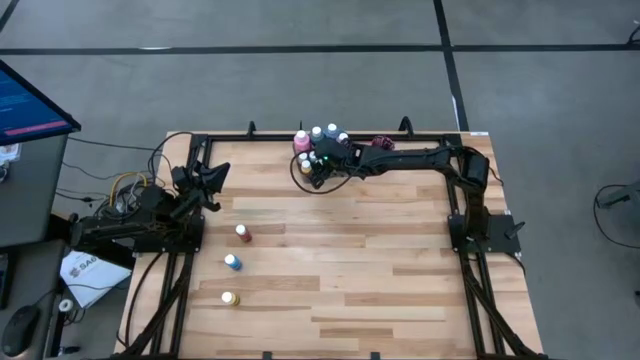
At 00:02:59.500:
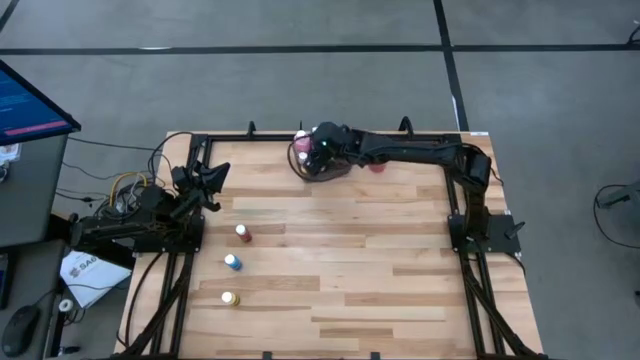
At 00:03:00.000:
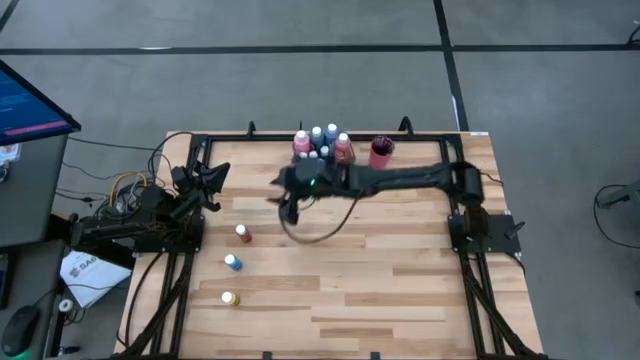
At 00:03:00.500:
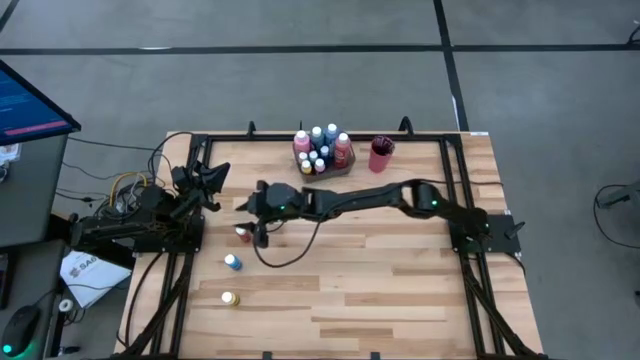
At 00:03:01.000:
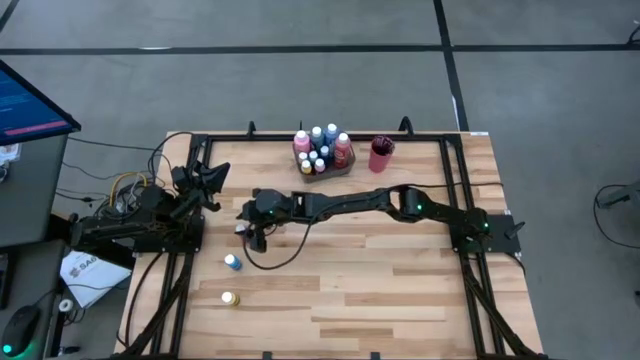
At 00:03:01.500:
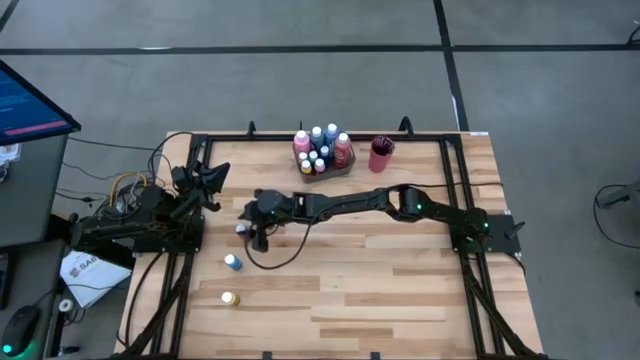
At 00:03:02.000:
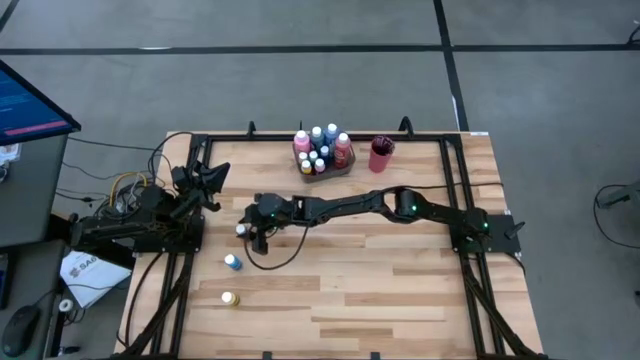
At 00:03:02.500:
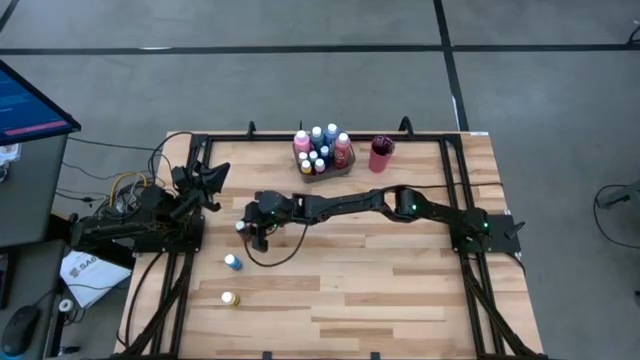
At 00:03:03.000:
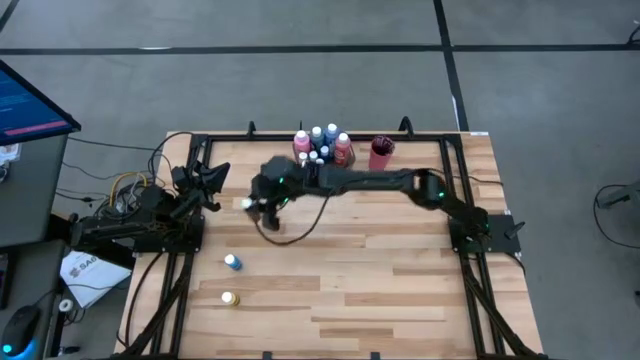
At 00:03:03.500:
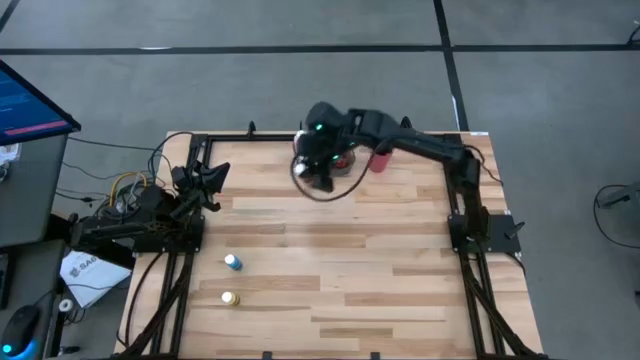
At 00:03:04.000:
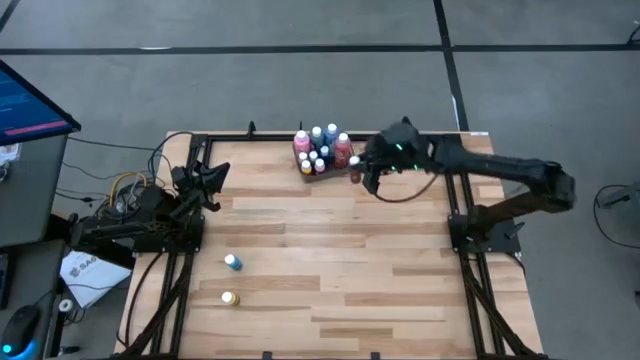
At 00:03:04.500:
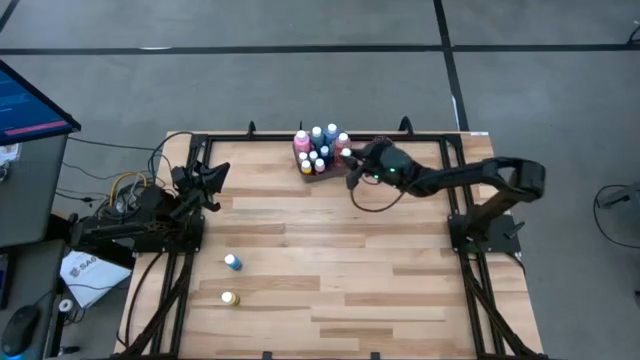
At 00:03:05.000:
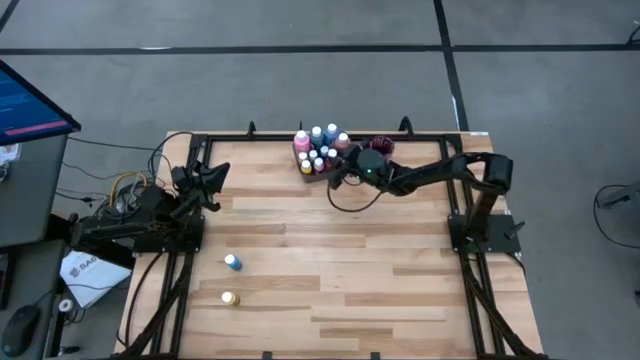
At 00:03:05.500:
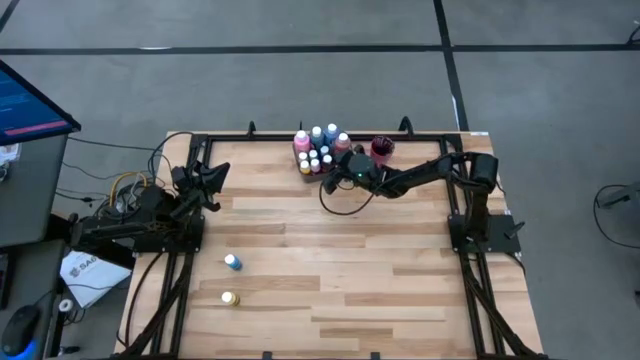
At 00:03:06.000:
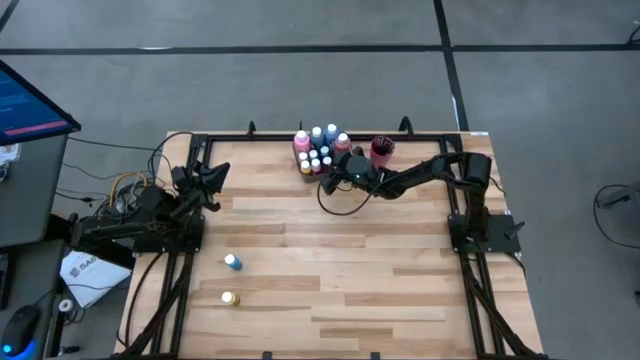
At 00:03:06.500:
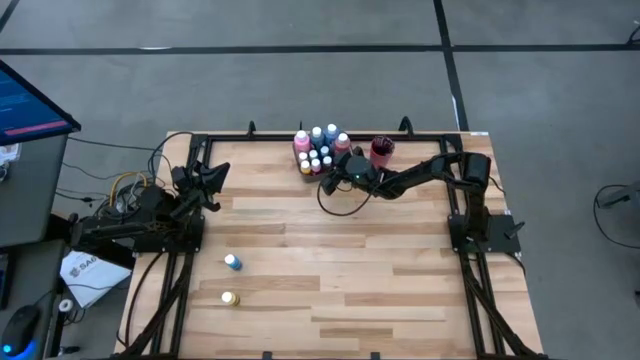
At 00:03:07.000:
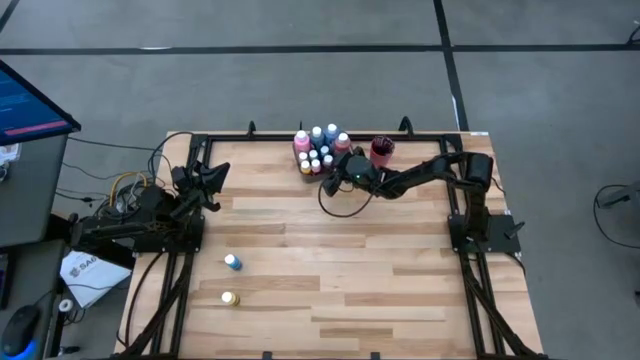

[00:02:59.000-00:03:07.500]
Task: Pick & Place Paint Supplies
Put the red paint bottle into the gray bin

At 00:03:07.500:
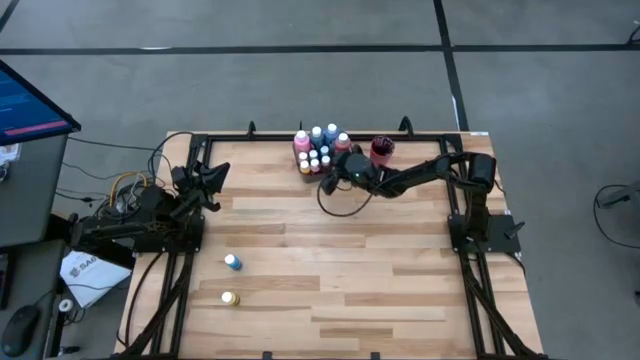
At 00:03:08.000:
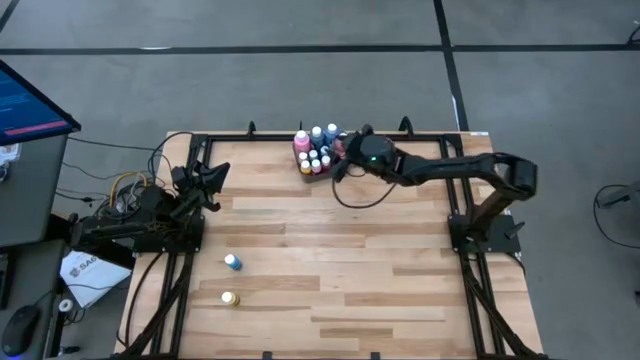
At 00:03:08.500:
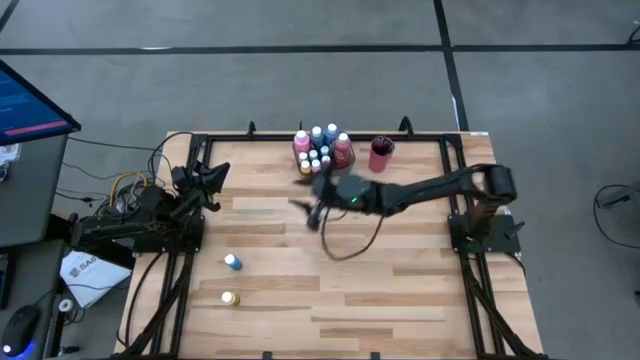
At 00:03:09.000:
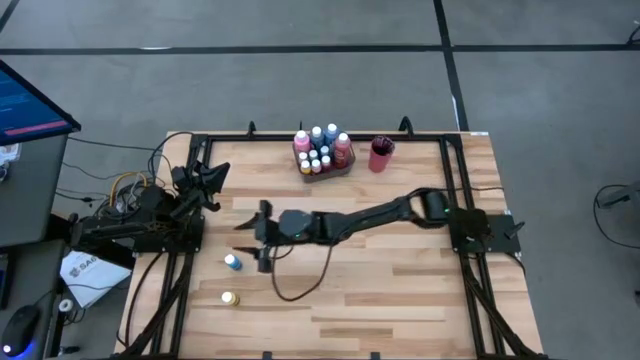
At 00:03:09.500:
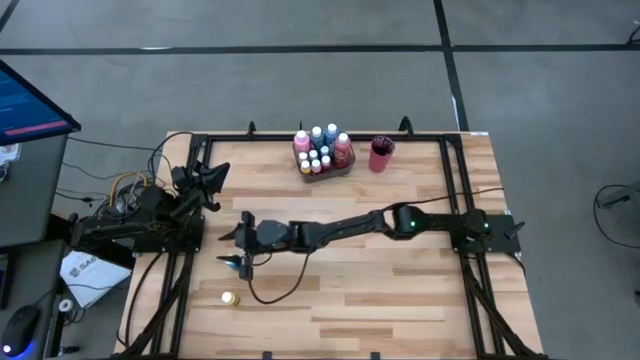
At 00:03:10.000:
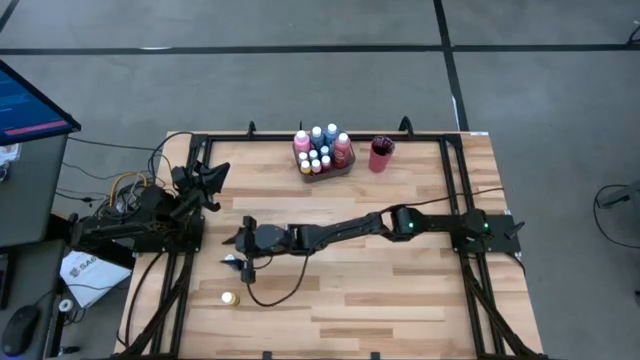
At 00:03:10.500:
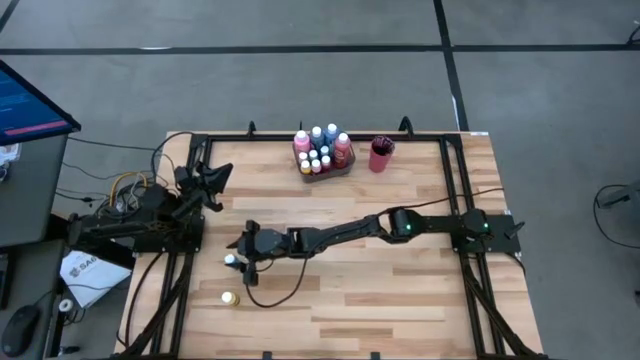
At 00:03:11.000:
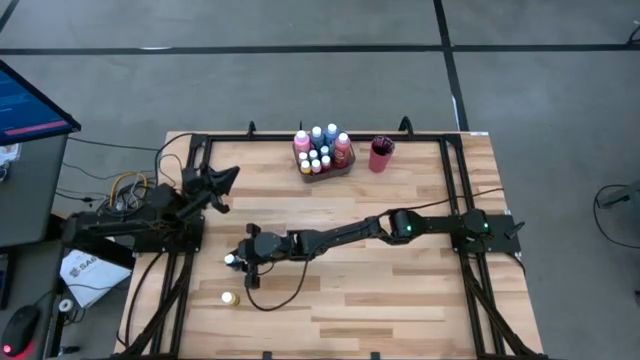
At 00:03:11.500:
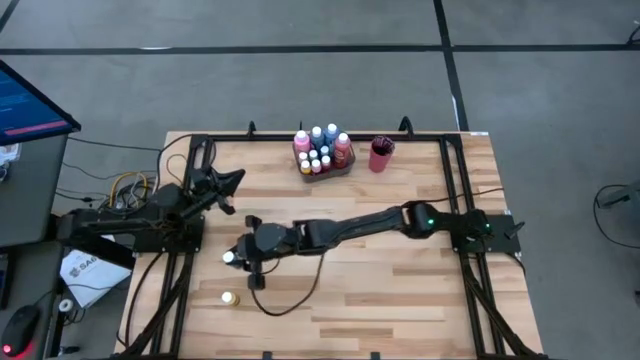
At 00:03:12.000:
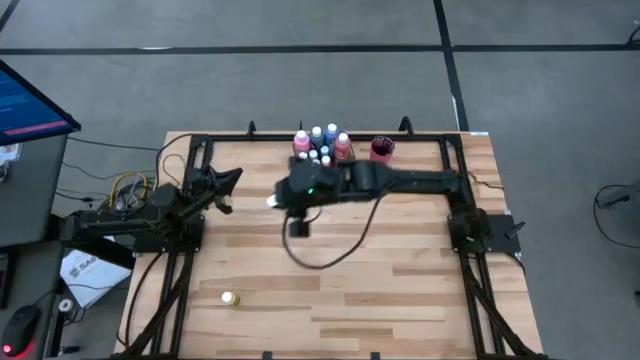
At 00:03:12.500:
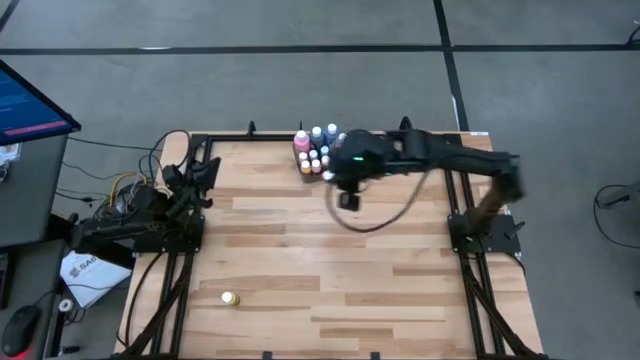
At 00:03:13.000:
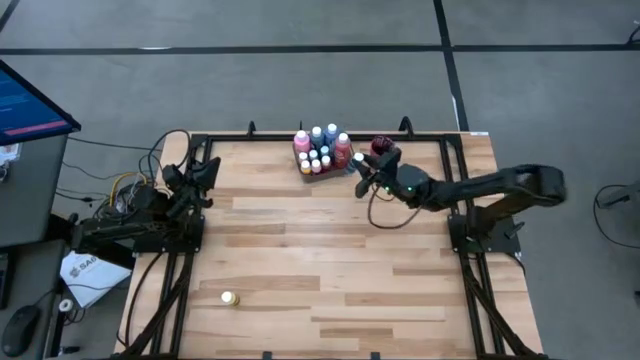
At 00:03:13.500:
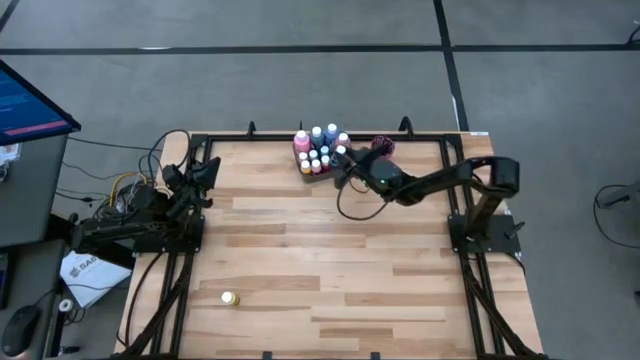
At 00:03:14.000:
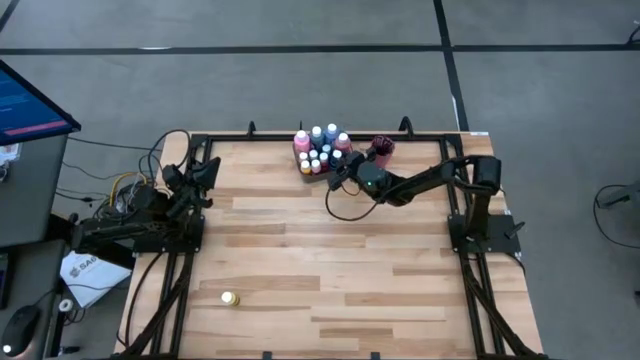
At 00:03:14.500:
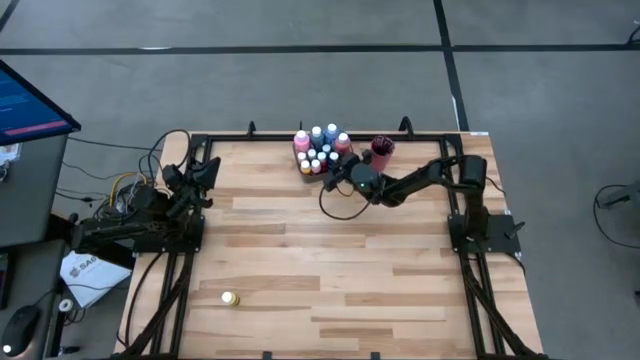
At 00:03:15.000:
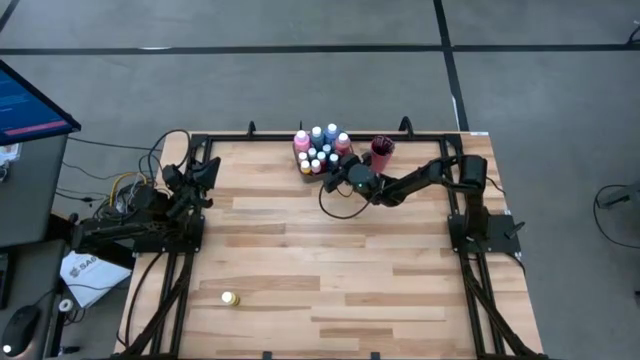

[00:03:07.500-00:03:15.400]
Put the light blue paint bottle into the gray bin
